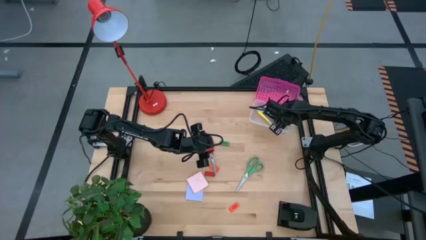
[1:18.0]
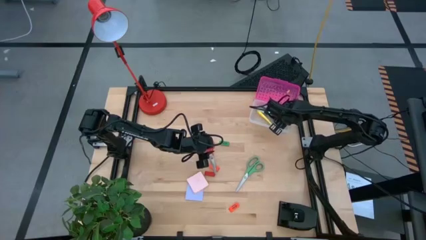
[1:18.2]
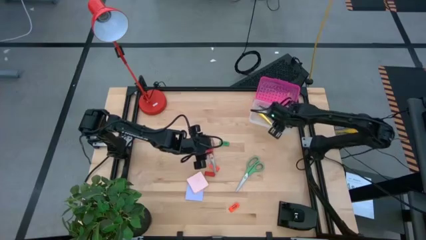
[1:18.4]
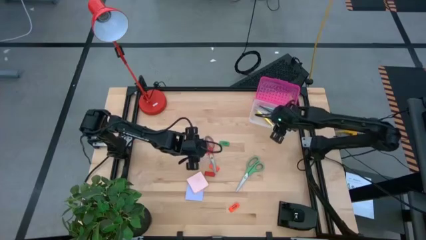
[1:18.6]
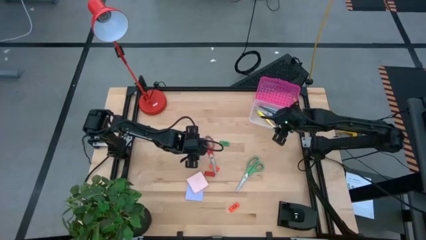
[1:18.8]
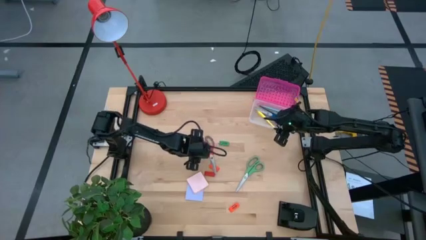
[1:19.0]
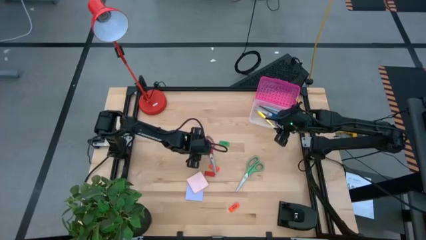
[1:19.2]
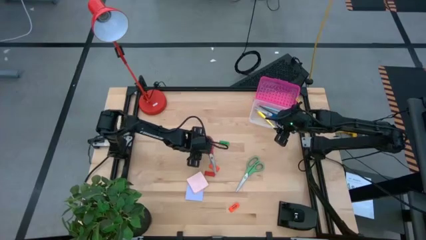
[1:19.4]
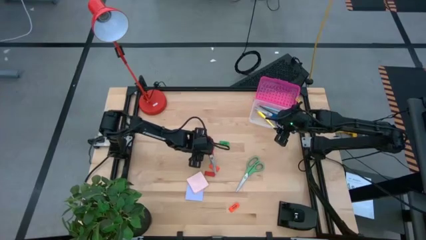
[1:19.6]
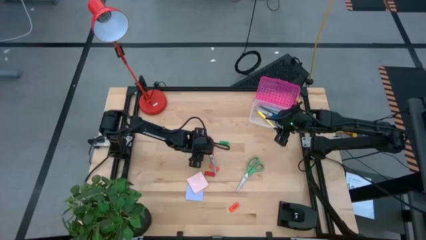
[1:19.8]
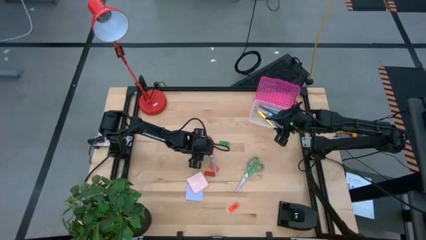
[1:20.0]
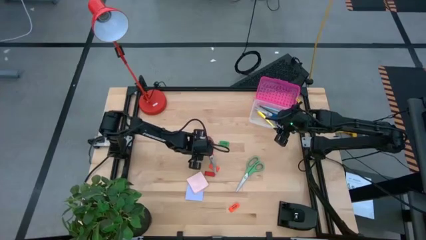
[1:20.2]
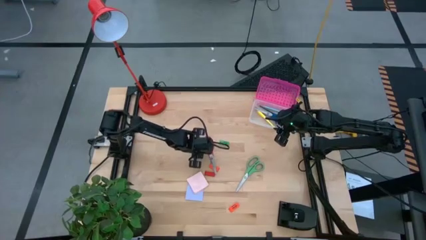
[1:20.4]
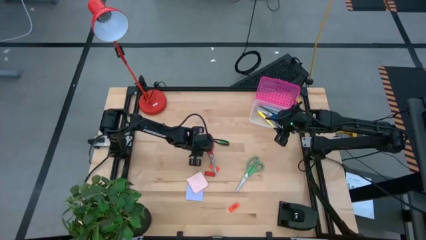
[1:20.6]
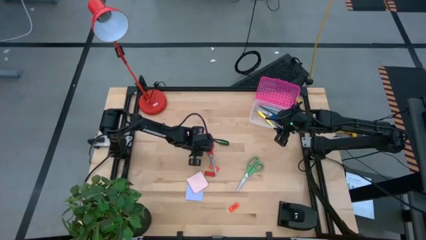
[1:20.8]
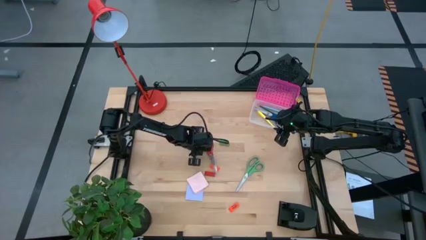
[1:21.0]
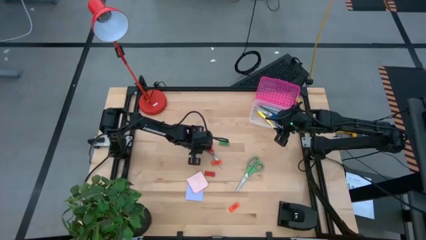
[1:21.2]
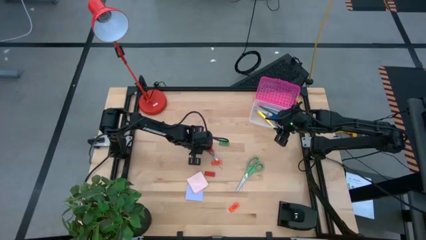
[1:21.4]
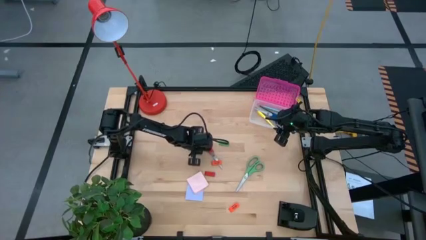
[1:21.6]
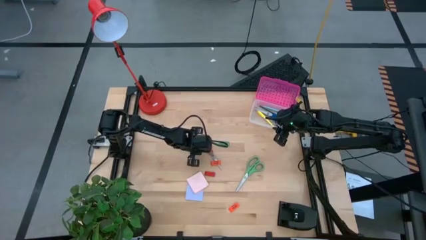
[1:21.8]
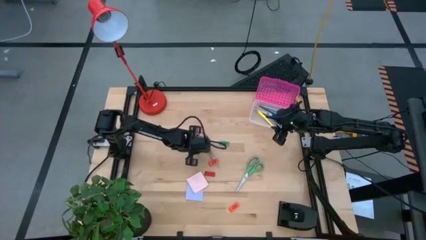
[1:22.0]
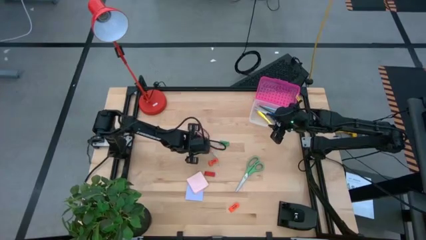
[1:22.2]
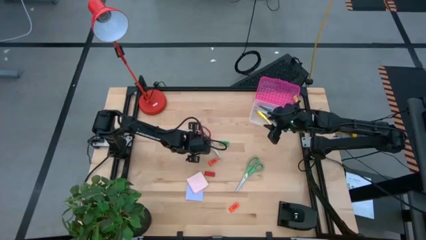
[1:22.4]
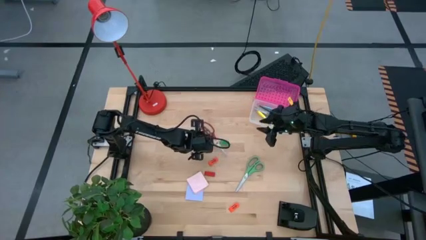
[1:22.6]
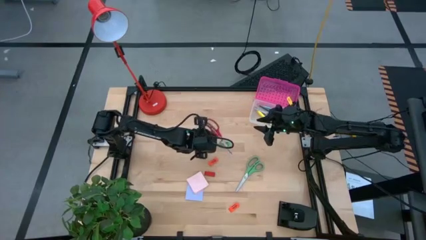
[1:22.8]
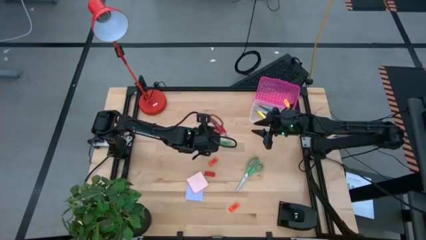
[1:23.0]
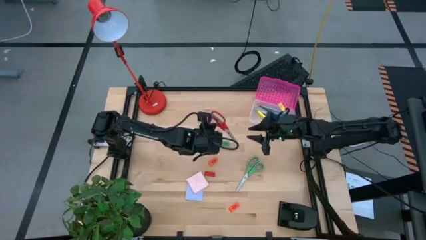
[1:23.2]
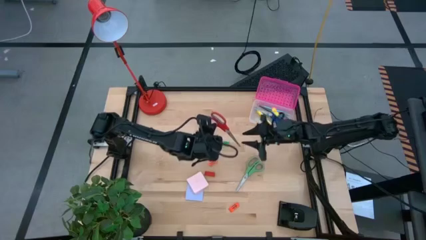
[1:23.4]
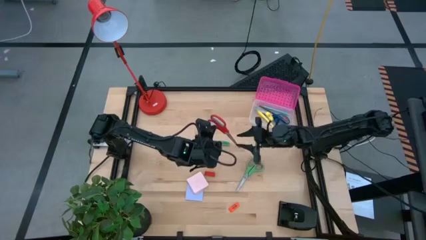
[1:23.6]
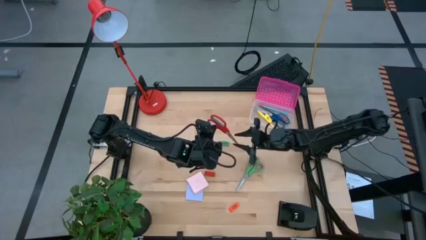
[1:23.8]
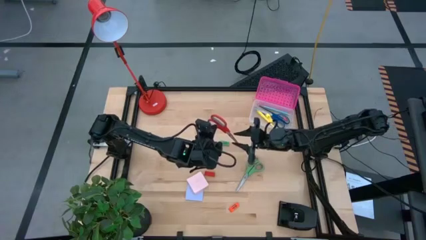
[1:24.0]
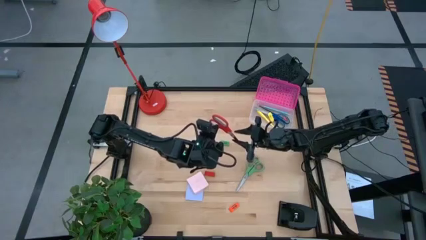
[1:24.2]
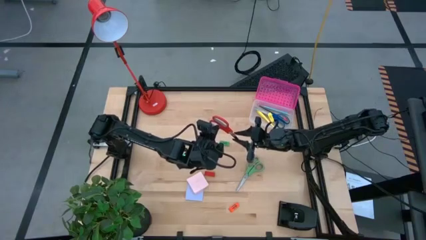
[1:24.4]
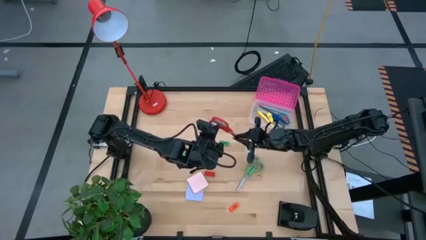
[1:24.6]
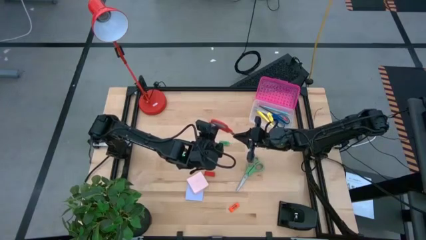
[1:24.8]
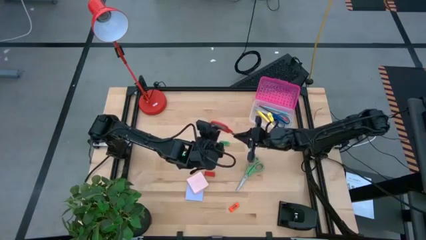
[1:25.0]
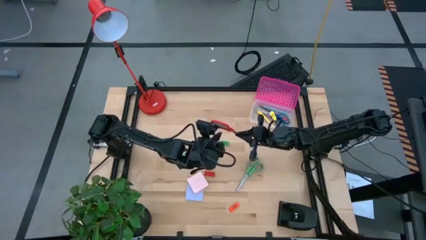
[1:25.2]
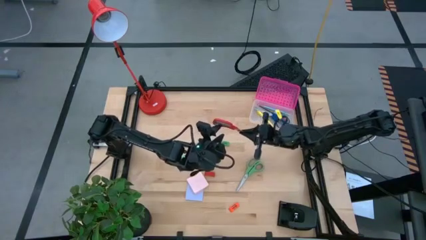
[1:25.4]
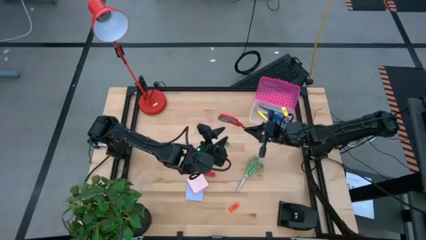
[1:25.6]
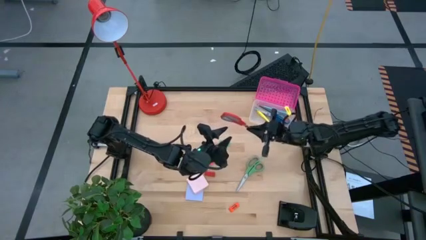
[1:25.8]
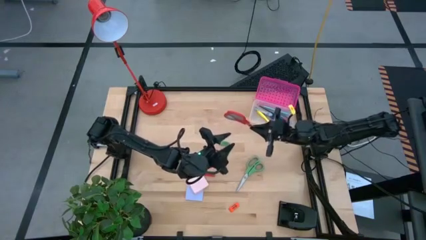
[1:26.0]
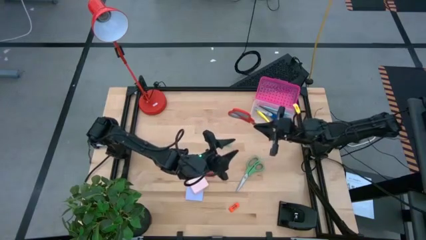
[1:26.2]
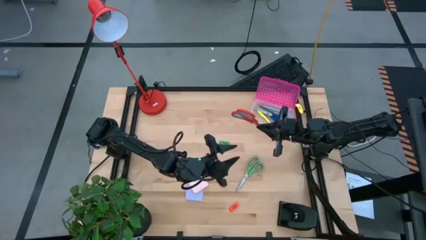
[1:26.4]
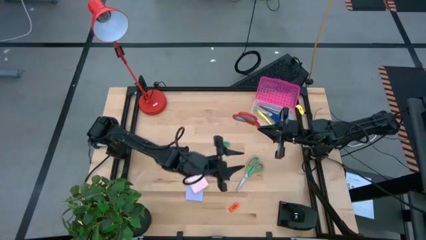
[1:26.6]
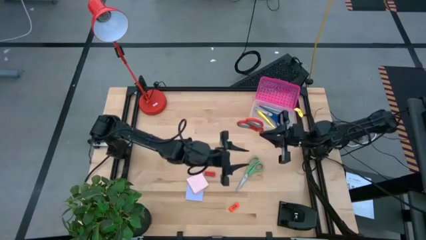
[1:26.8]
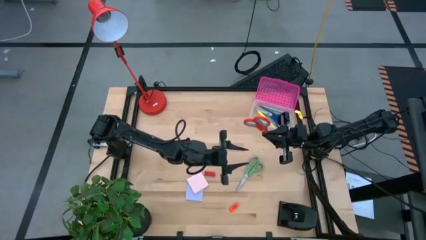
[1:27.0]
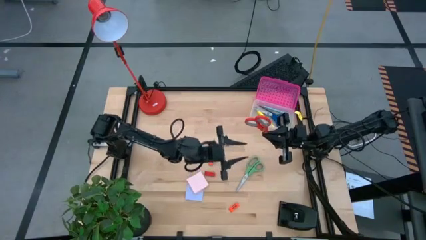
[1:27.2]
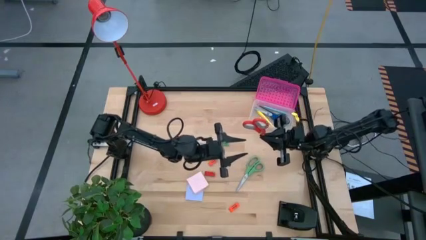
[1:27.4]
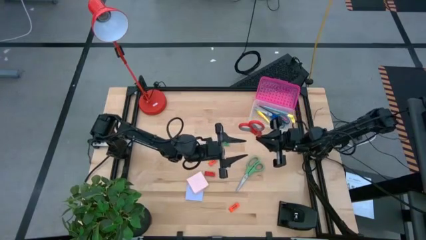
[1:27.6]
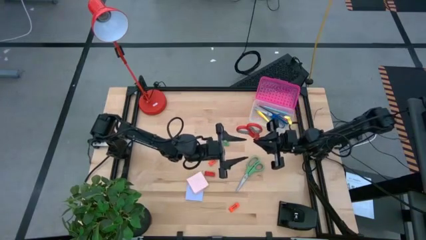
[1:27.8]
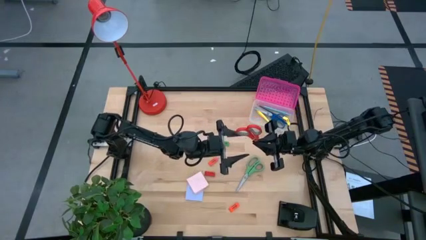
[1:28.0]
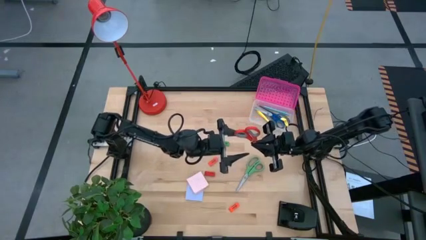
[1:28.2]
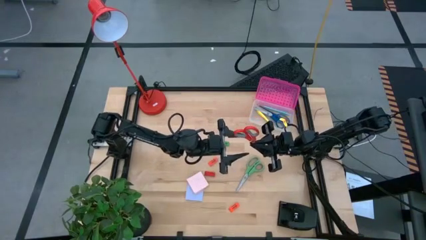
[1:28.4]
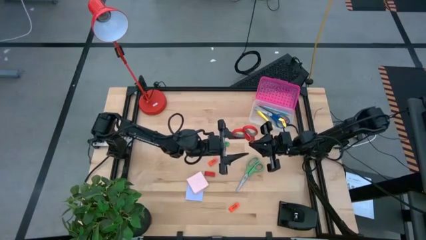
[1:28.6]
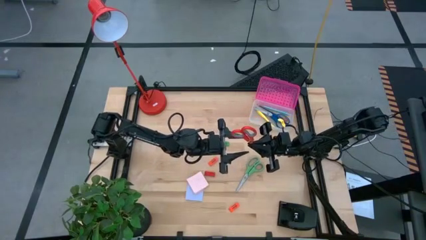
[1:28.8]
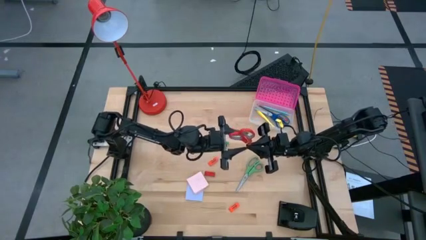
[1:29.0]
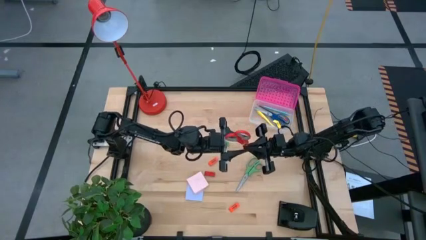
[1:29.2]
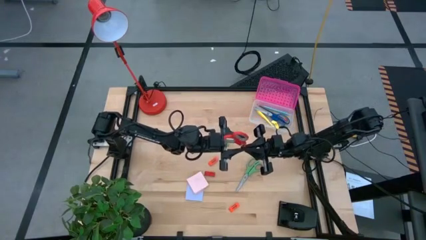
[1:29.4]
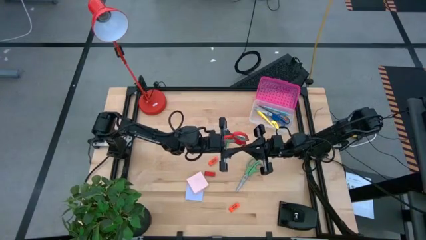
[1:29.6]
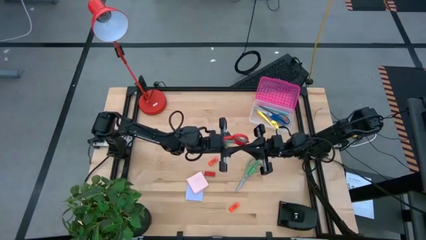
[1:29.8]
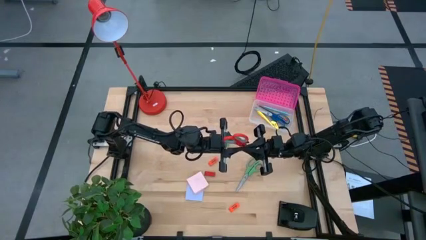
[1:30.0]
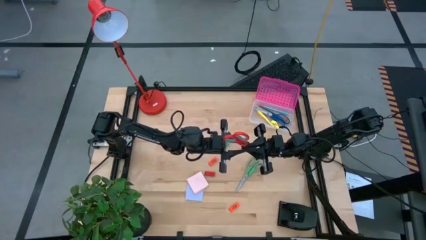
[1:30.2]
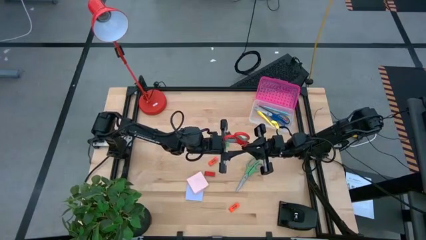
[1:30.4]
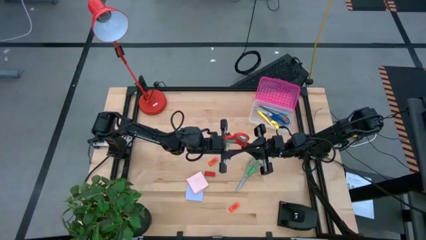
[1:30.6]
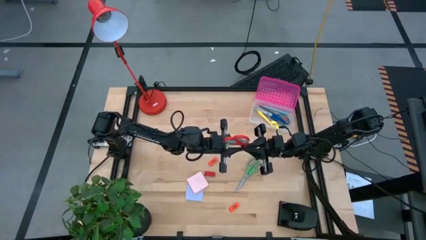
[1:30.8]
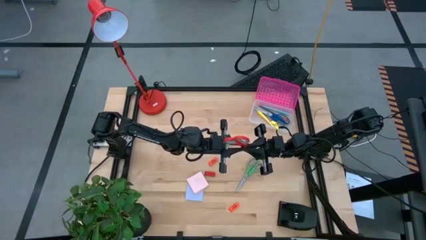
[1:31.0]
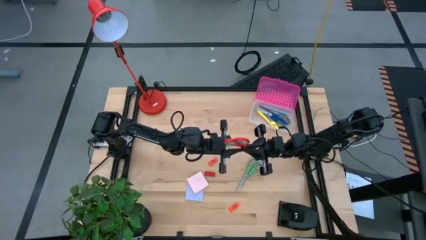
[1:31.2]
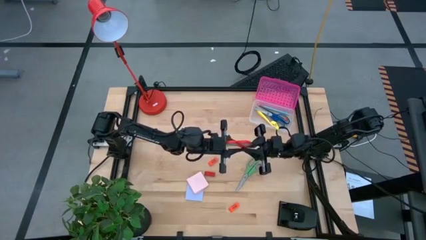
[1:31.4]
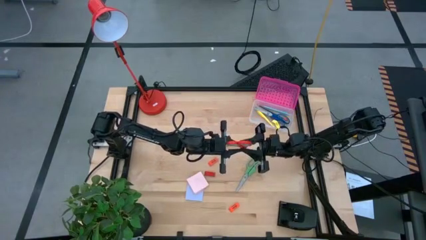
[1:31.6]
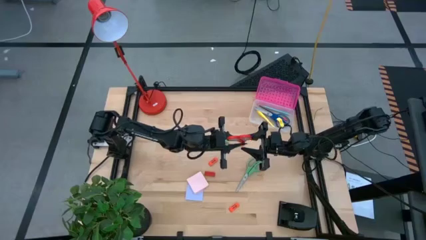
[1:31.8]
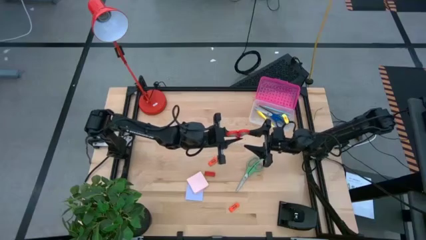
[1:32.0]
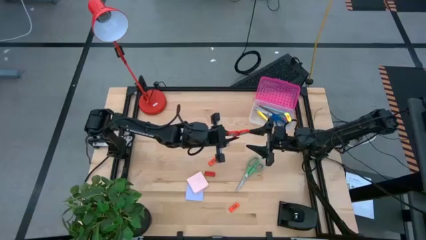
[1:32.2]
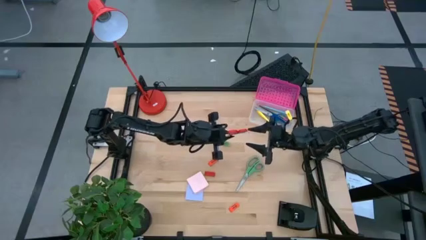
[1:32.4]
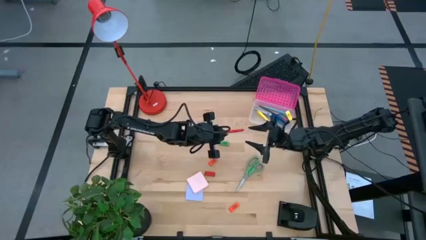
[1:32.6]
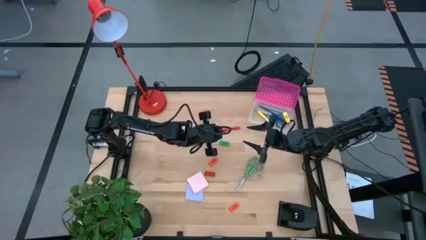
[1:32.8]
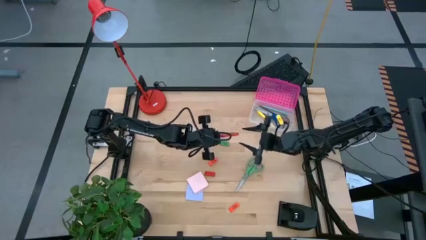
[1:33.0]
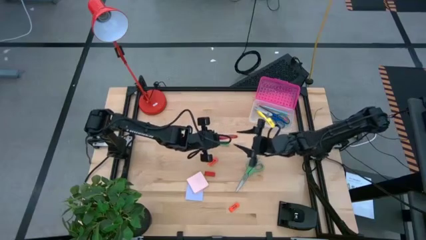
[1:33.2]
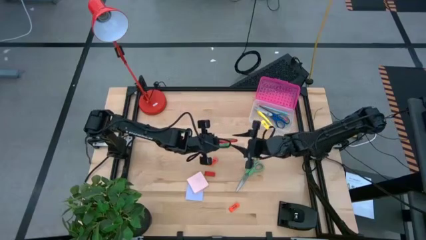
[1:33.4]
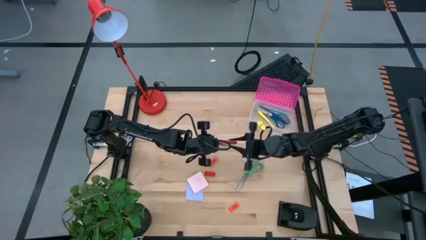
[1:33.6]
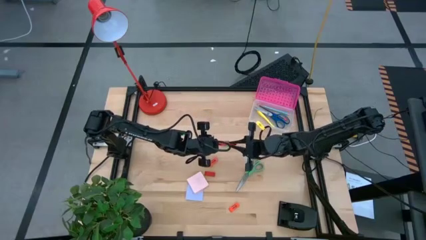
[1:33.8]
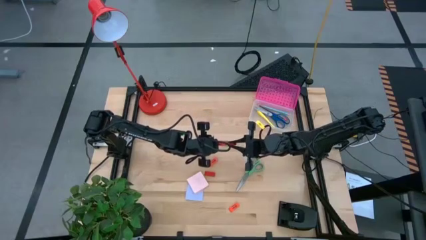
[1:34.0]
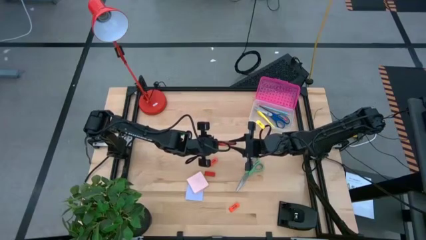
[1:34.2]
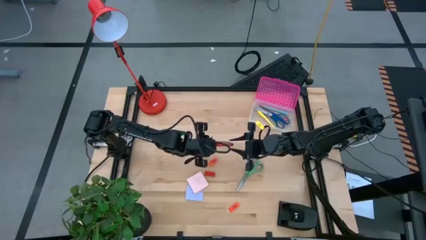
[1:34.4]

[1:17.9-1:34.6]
Task: Pack school essentials
Put the orange scissors into the supply box
